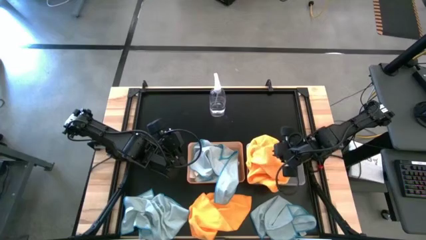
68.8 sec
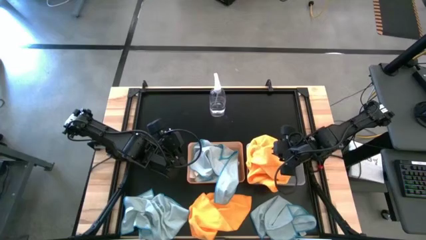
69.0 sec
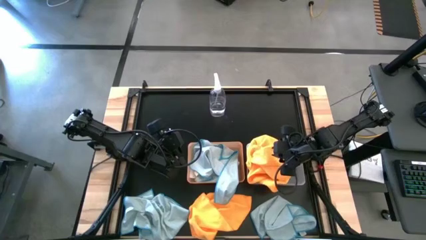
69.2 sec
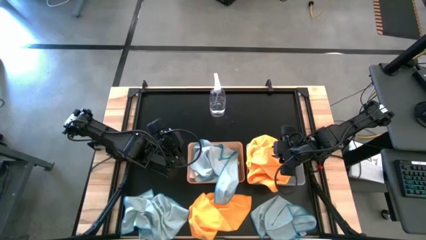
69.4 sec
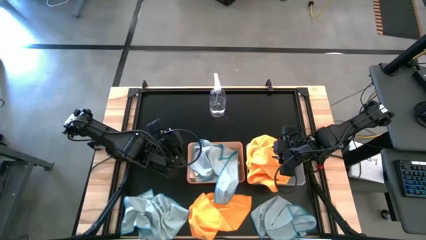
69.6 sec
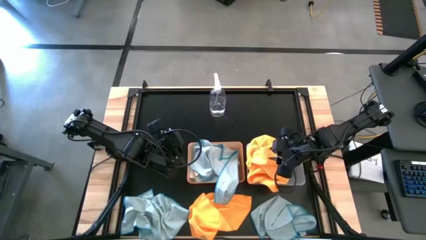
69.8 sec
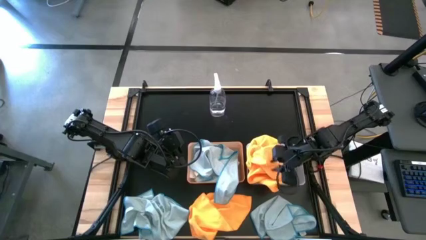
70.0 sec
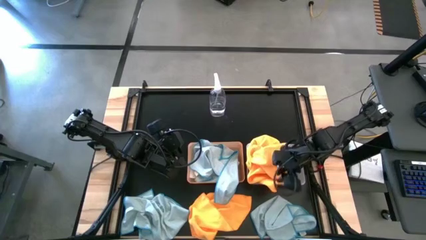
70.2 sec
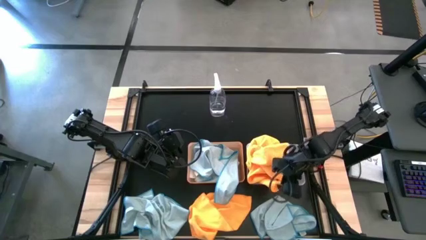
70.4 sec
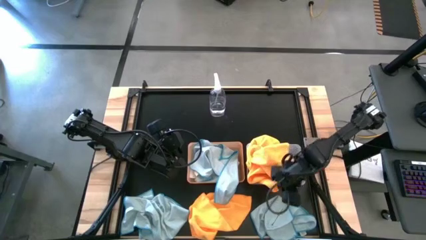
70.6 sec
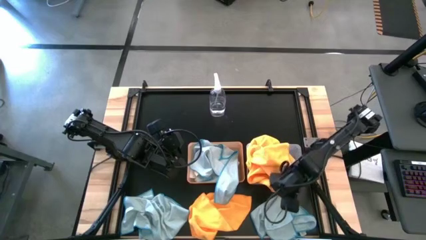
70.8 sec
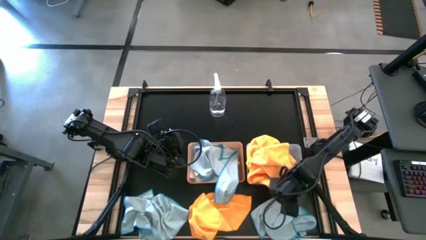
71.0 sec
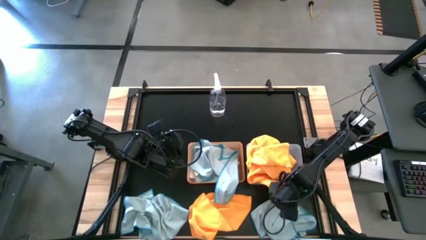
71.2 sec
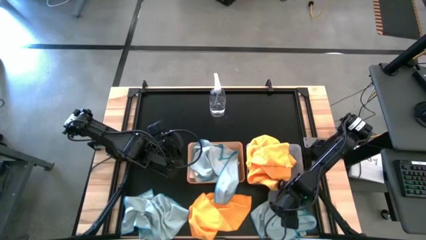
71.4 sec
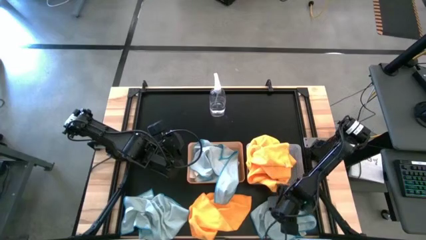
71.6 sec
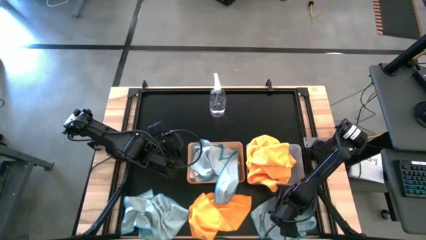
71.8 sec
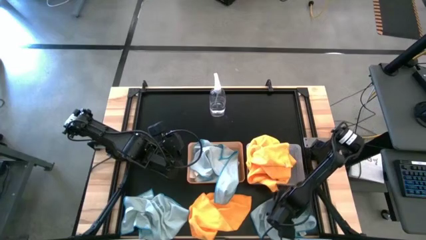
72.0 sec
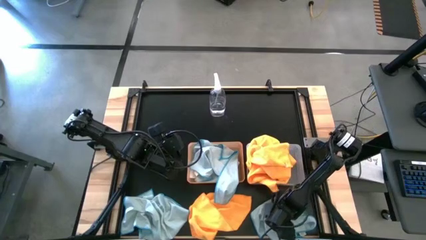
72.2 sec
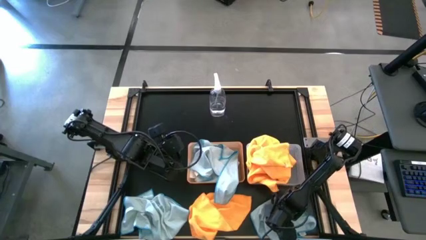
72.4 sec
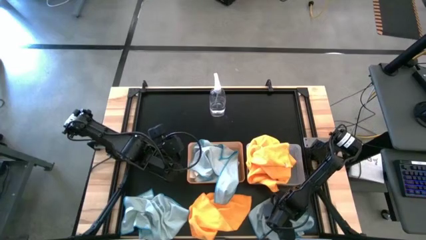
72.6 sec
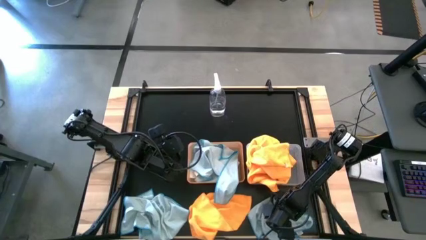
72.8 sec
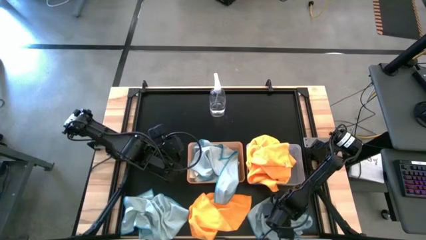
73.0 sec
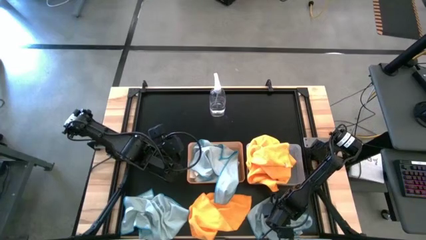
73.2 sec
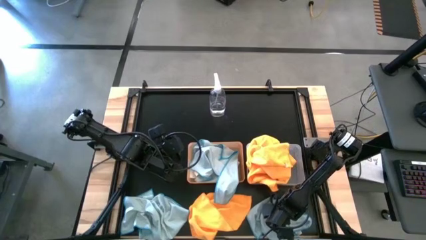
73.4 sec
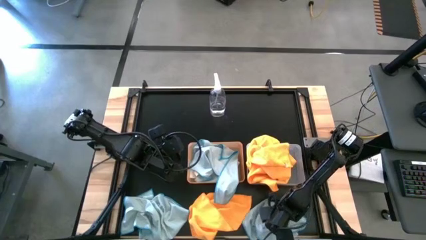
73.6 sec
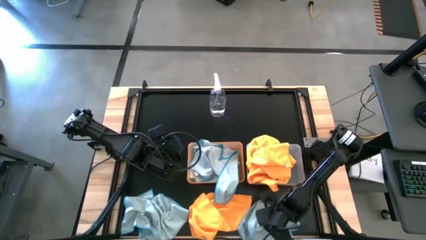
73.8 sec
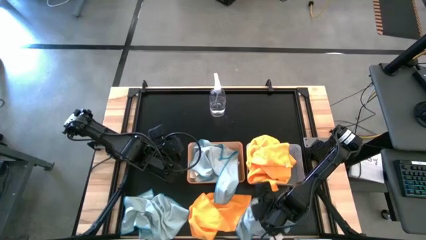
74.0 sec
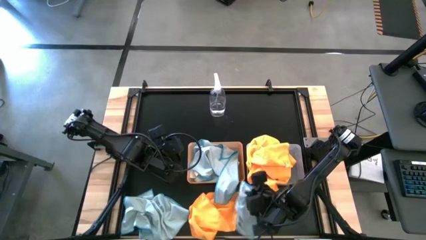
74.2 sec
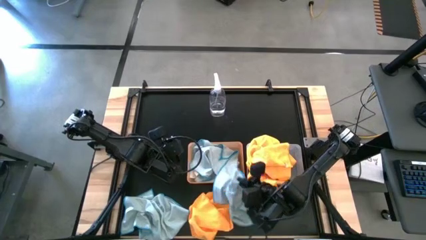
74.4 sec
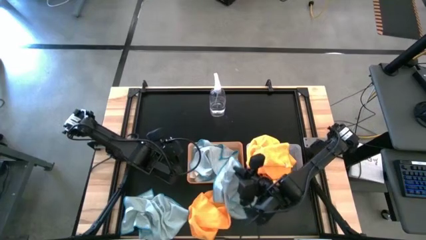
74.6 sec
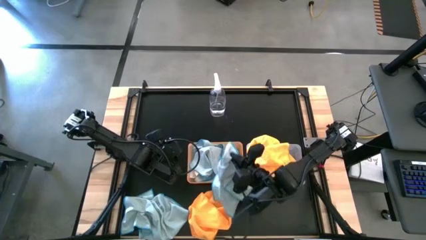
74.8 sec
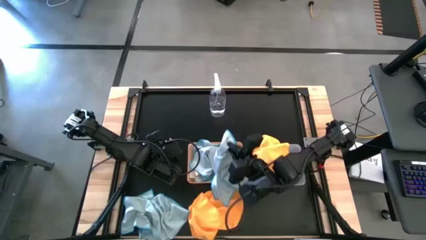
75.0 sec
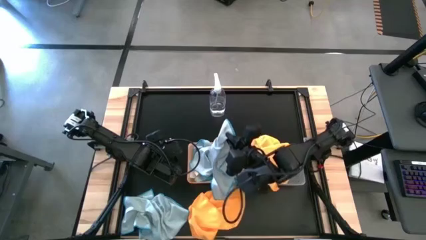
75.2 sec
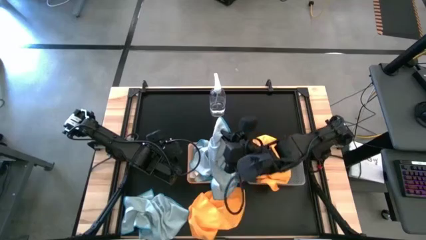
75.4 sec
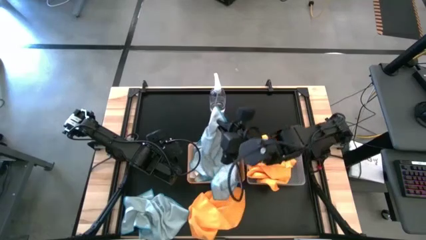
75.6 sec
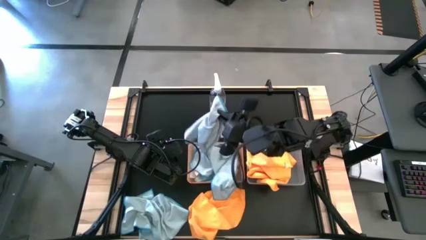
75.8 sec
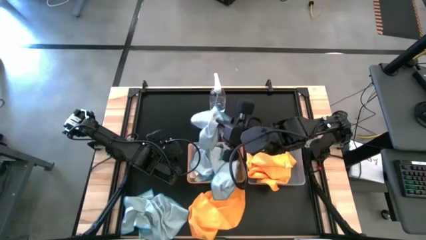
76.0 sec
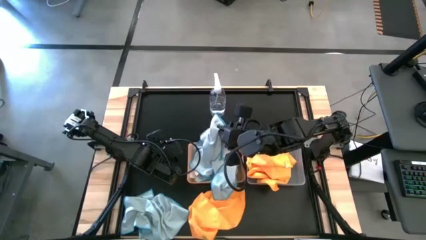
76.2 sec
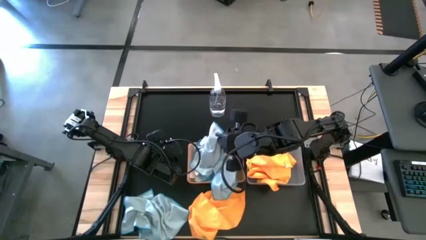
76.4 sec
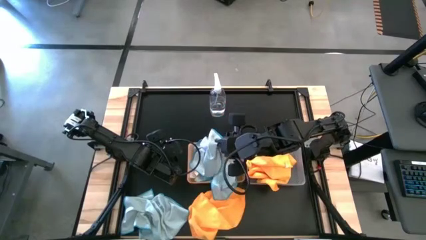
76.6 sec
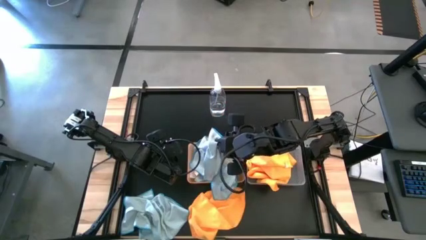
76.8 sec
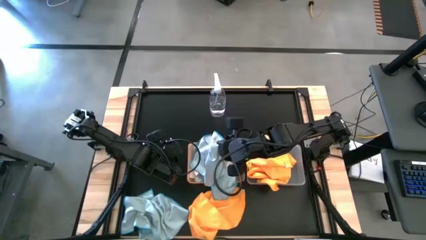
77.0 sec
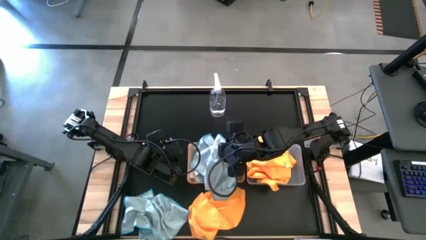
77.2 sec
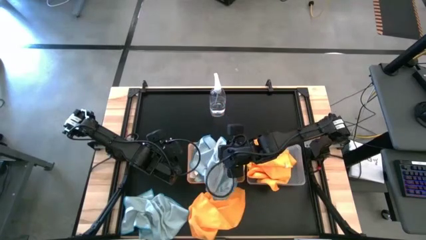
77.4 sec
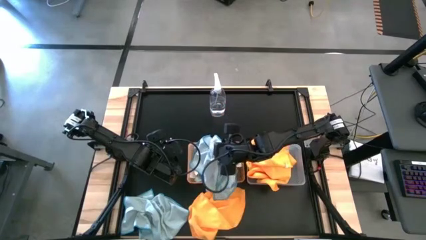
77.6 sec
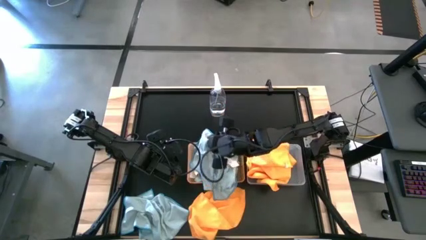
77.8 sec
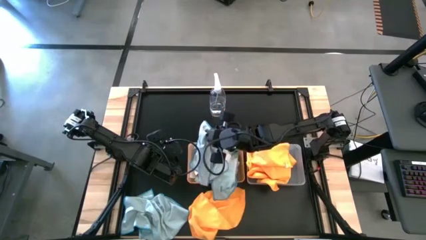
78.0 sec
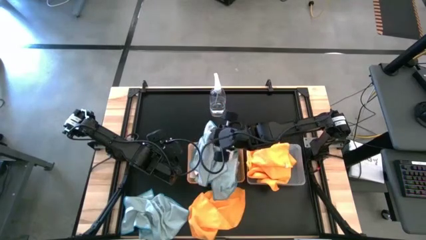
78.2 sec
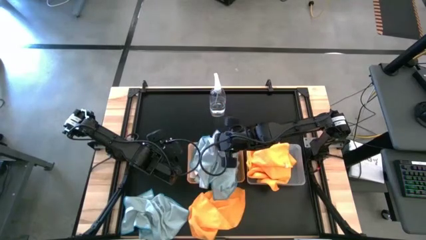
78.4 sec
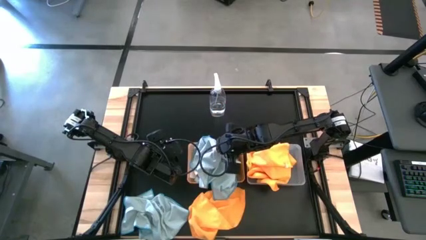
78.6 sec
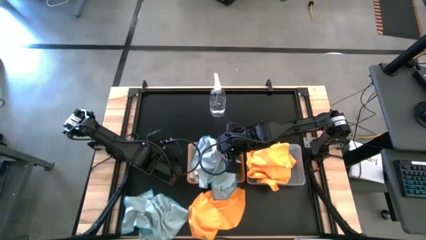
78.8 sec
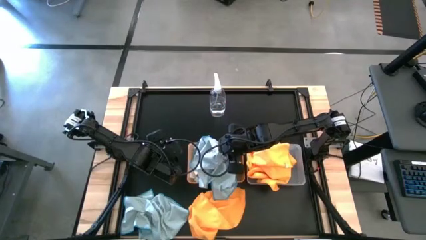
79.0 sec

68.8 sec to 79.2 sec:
Task: Sort microfiber towel by color & place in baskets
Put the blue towel into the orange bin
